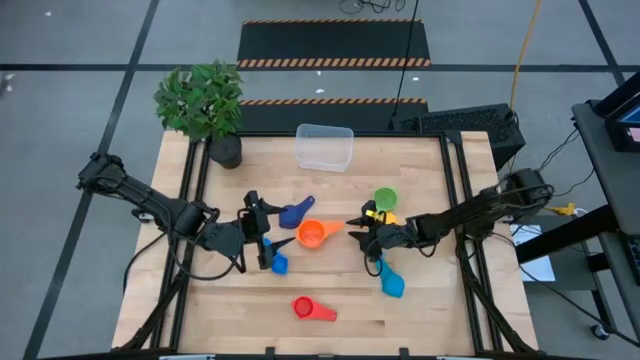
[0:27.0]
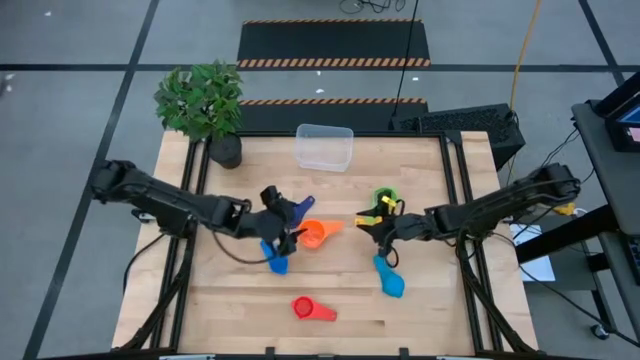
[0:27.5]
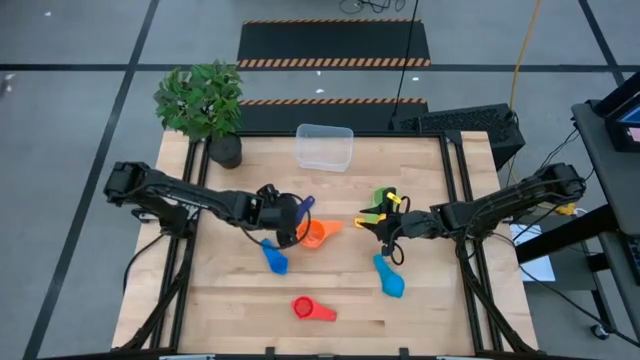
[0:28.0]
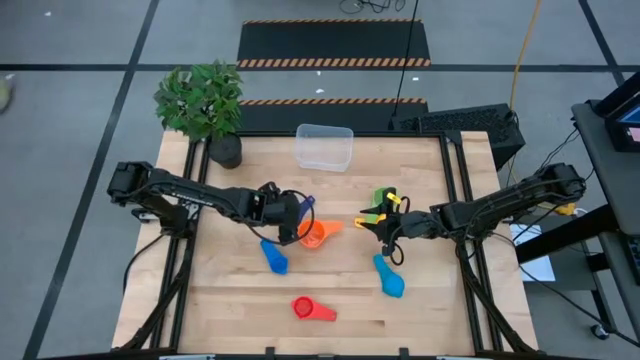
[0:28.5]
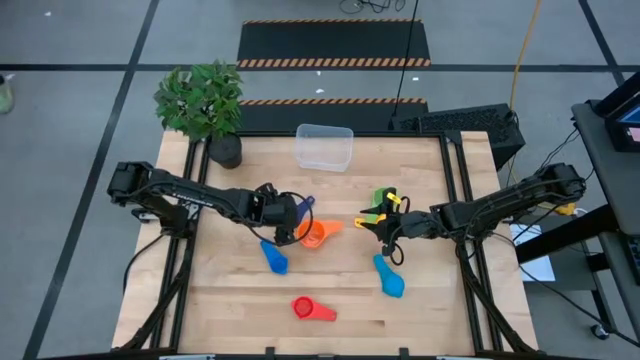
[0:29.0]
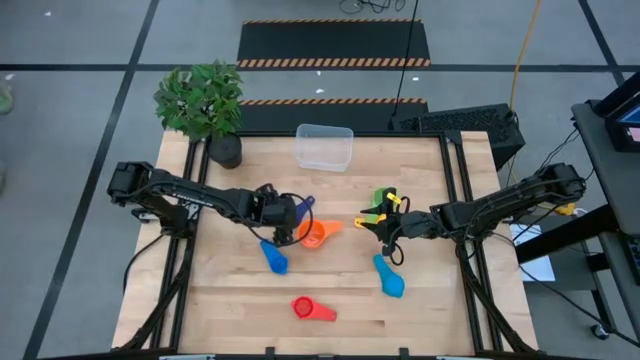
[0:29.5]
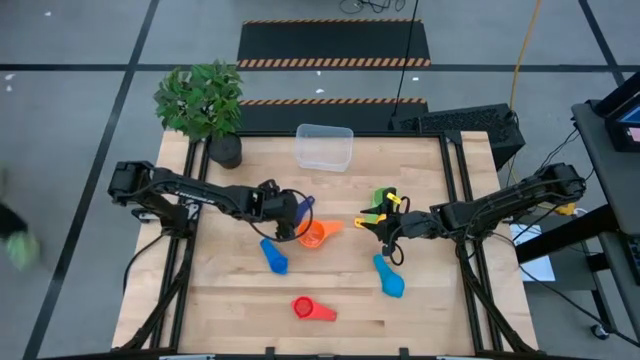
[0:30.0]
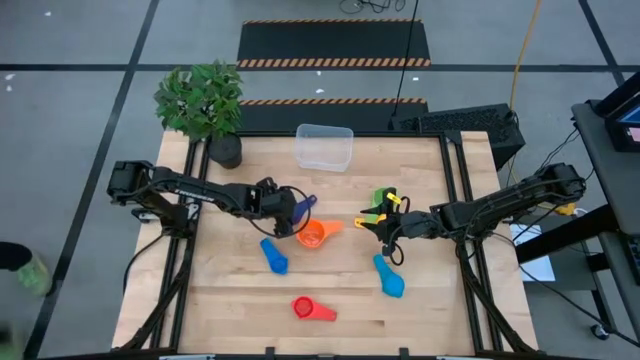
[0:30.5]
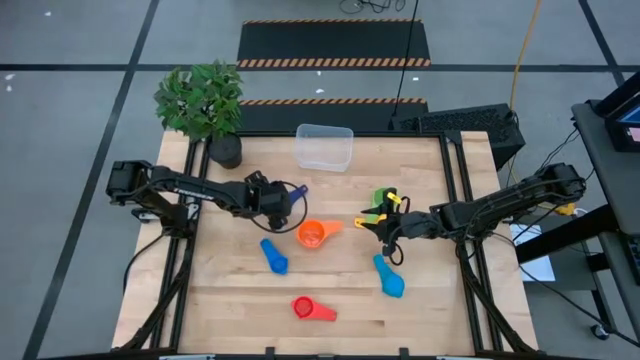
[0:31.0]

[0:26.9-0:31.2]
Task: Nest measuring cups in basket
Adjust the dark blue measuring cup on the table

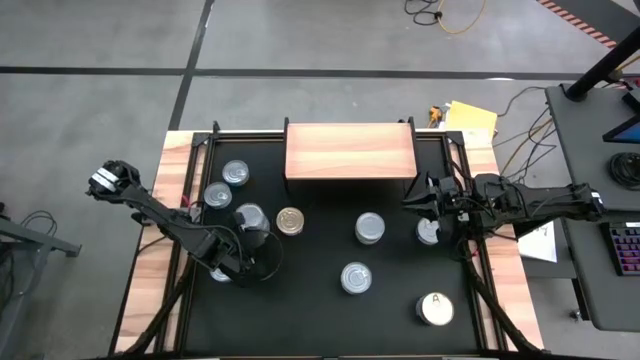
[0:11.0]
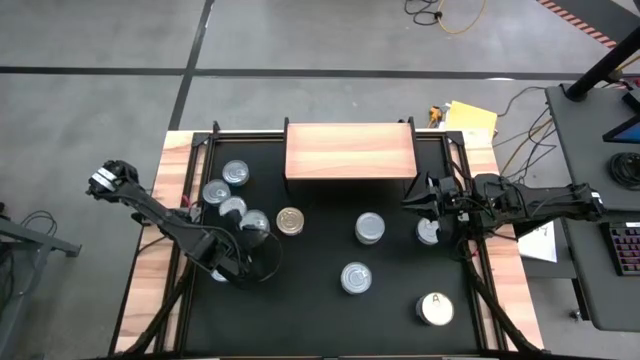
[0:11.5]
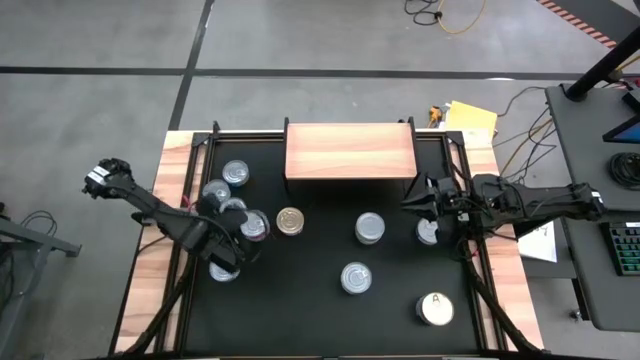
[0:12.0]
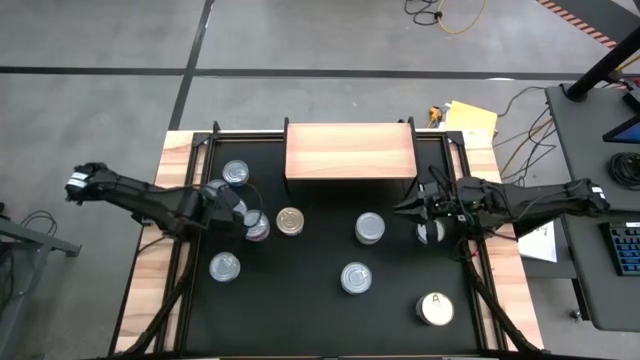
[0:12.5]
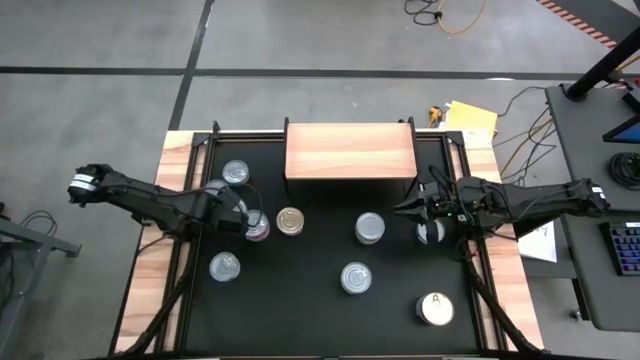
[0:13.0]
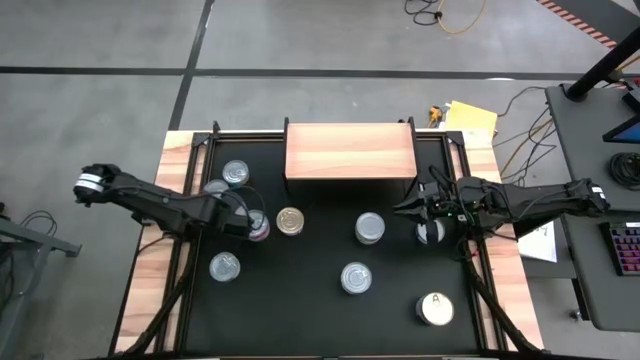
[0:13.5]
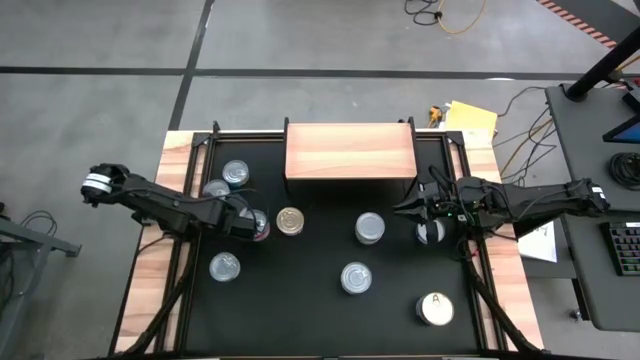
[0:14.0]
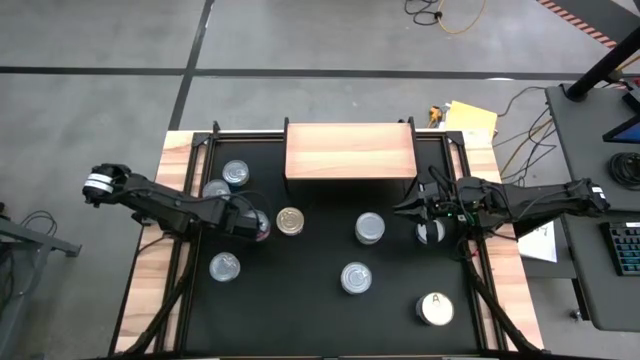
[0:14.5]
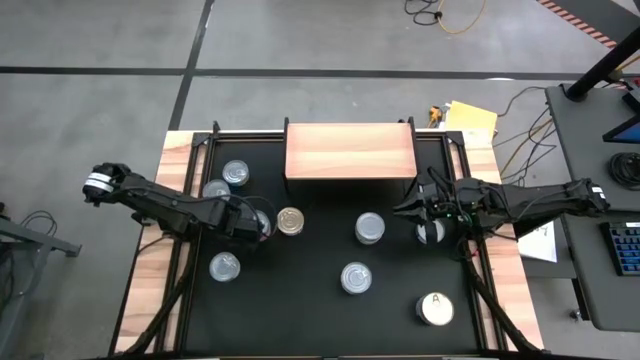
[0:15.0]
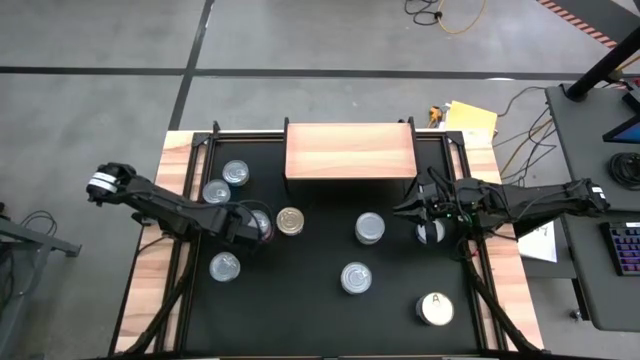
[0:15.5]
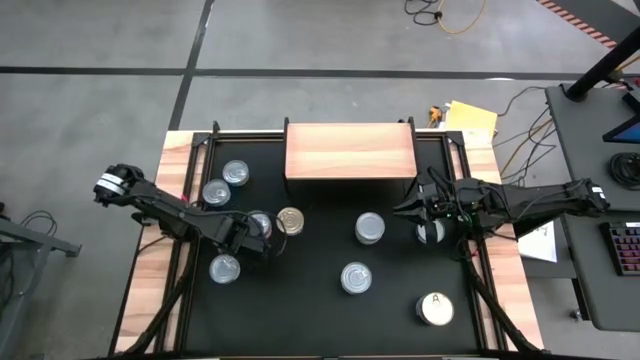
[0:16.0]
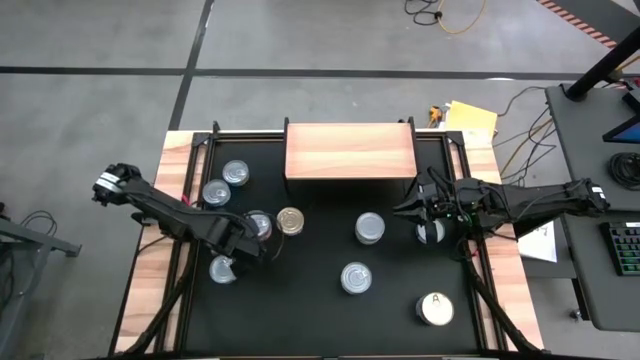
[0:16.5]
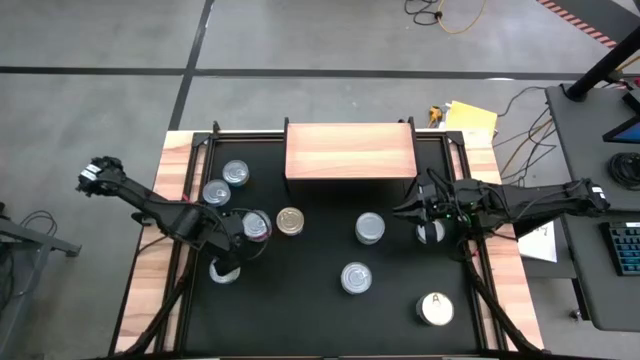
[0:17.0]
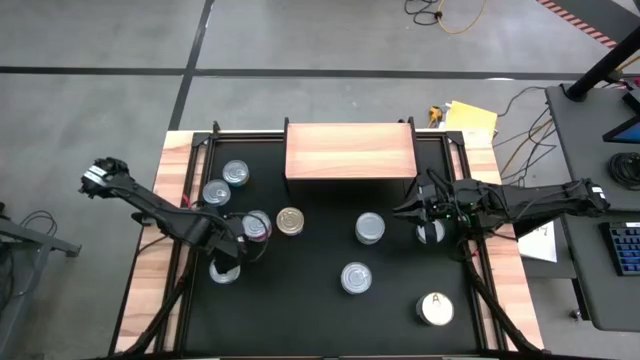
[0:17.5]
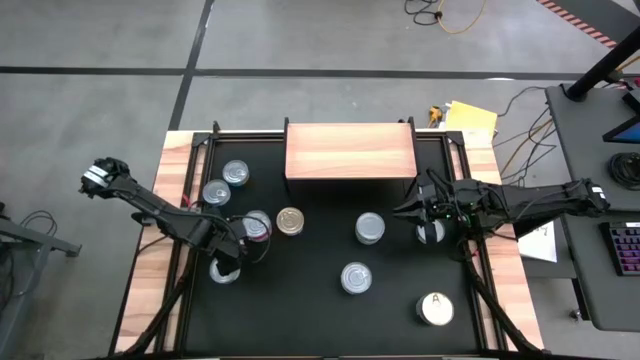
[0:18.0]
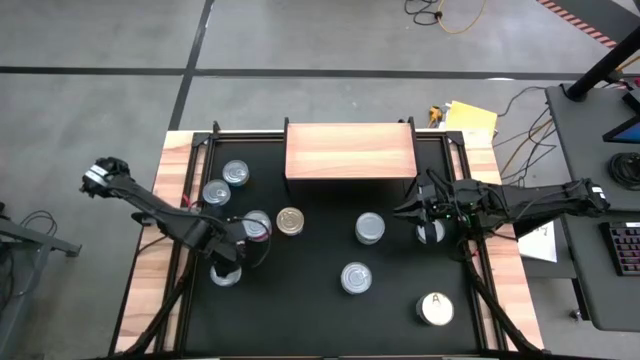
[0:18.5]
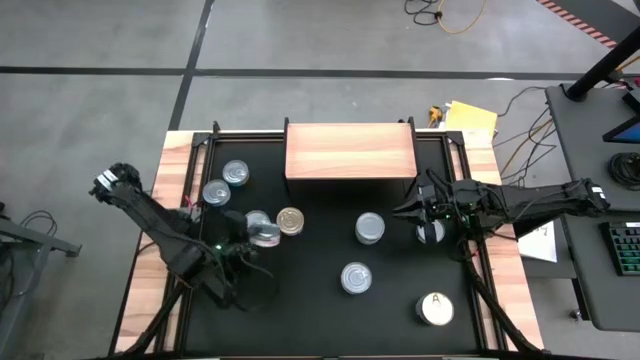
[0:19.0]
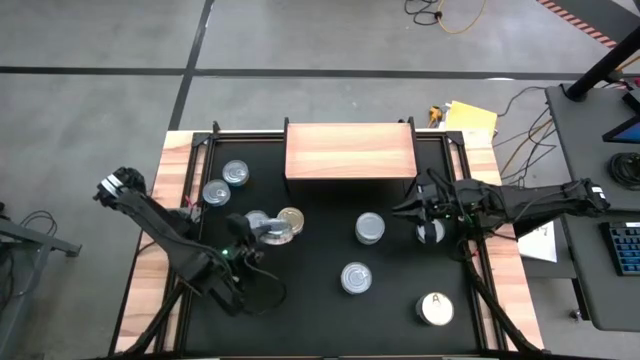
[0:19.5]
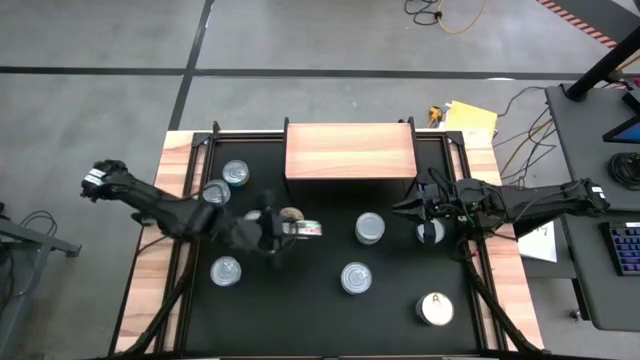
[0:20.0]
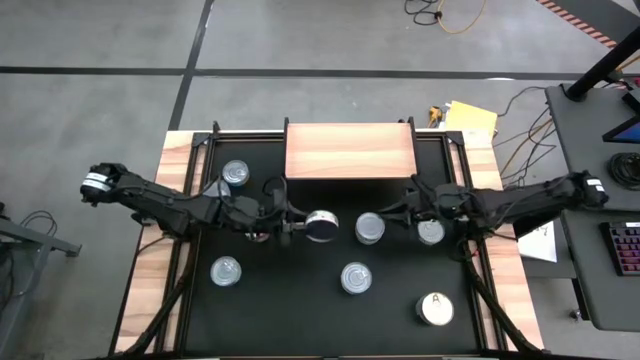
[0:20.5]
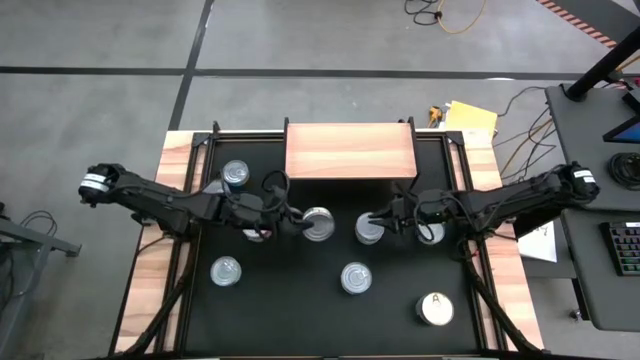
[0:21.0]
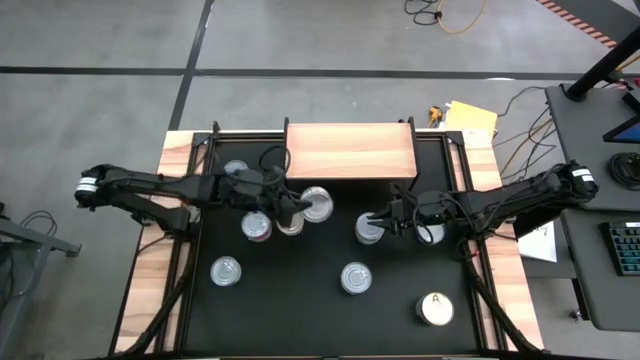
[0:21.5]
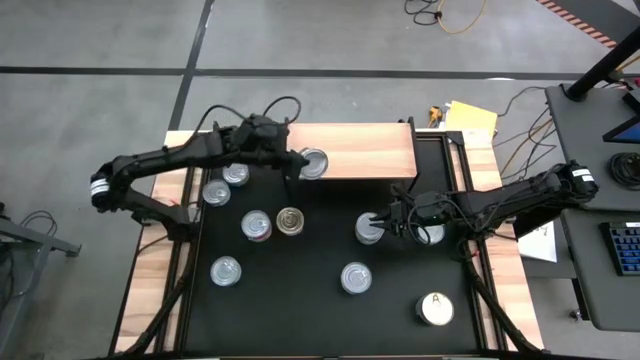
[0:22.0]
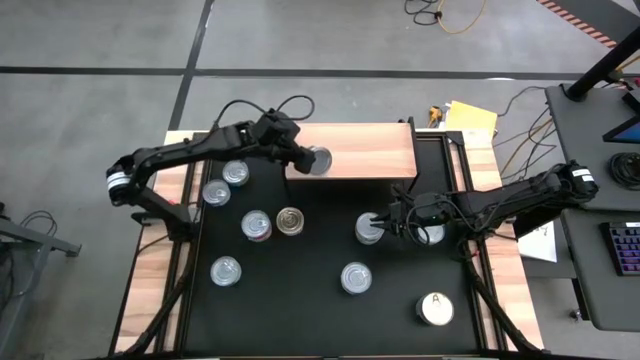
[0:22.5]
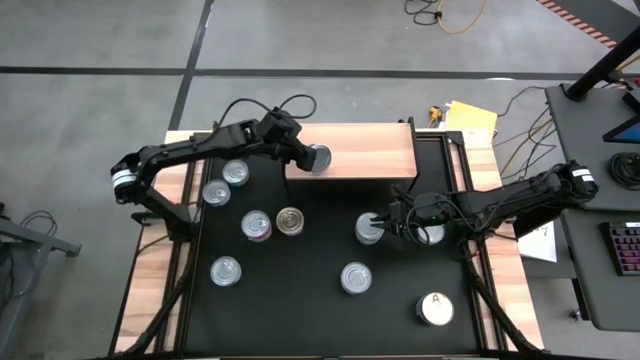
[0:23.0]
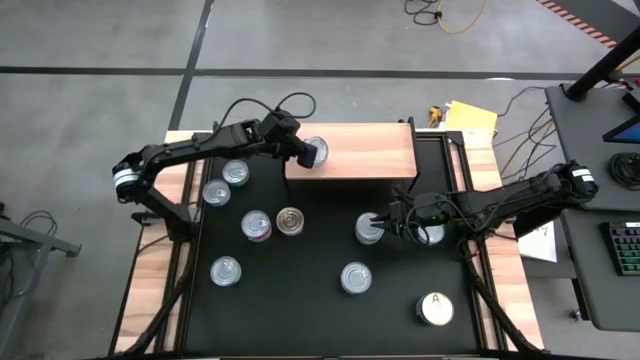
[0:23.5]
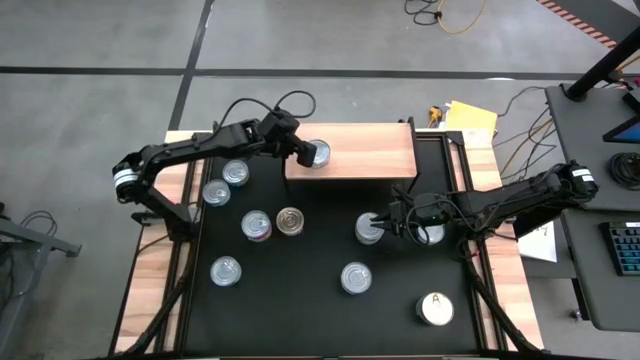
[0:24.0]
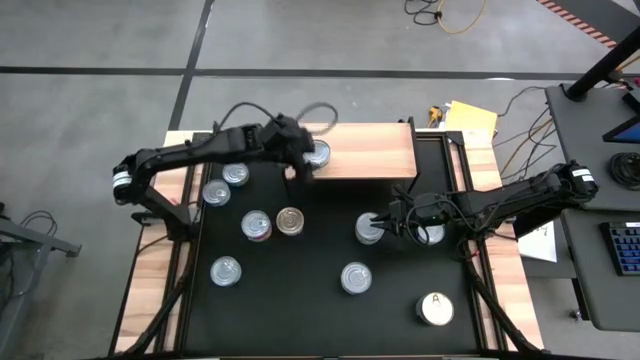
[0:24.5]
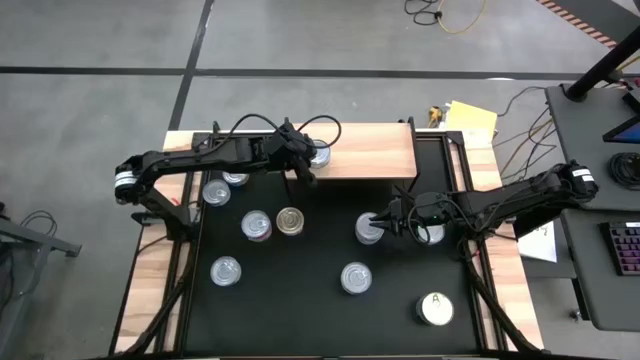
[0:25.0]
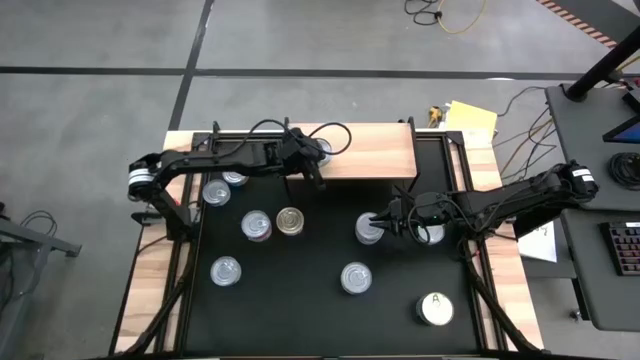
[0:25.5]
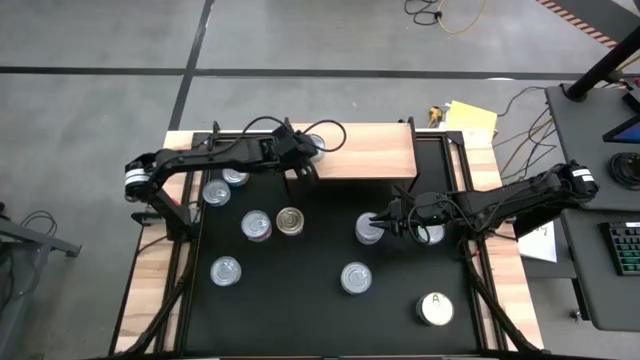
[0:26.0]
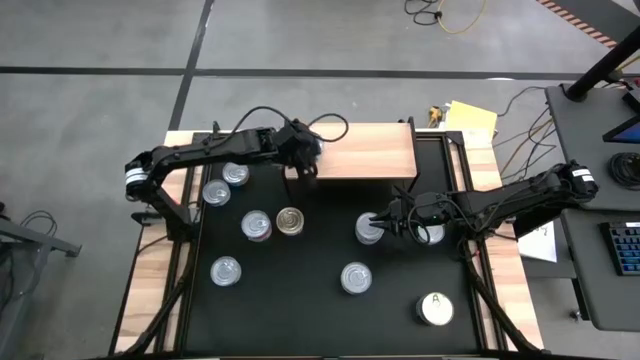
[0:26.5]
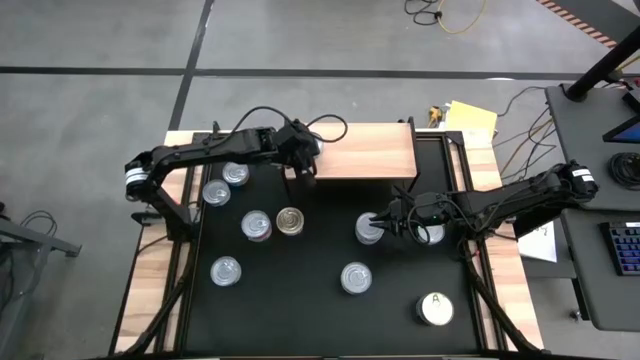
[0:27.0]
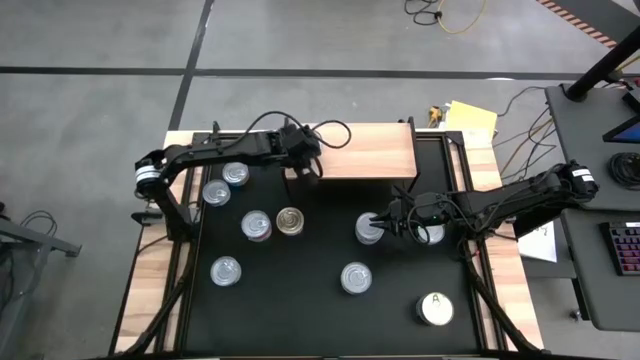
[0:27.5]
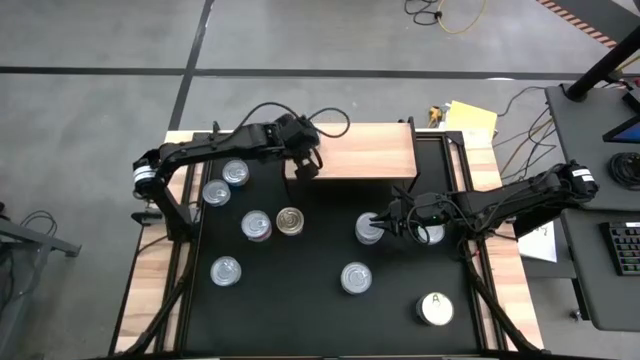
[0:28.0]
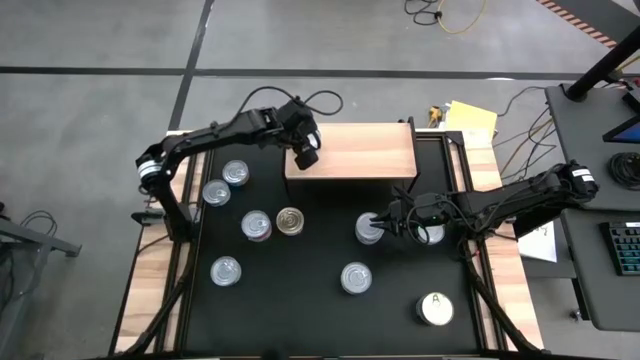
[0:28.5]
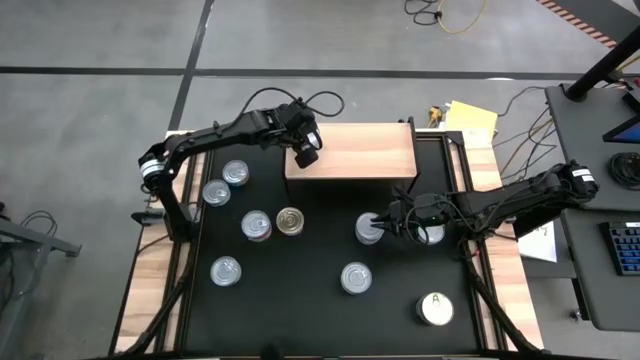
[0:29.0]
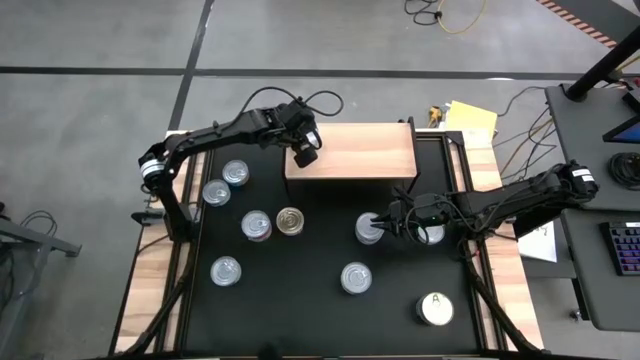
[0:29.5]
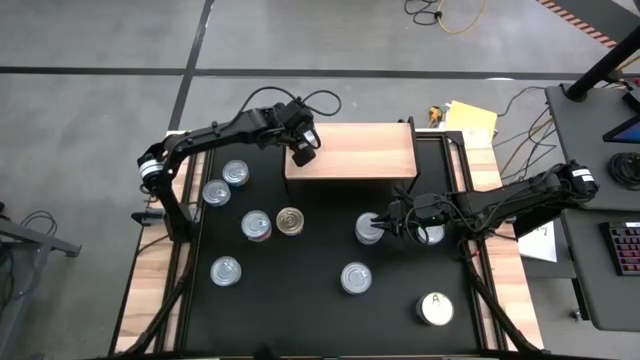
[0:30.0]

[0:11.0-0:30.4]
Task: Stack canned seafood by type on shelf
Put the green white tuna can on the shelf
